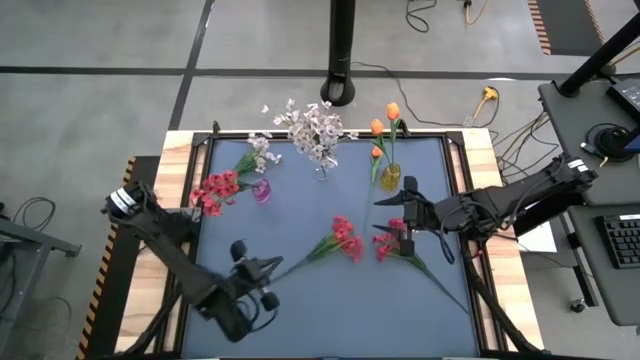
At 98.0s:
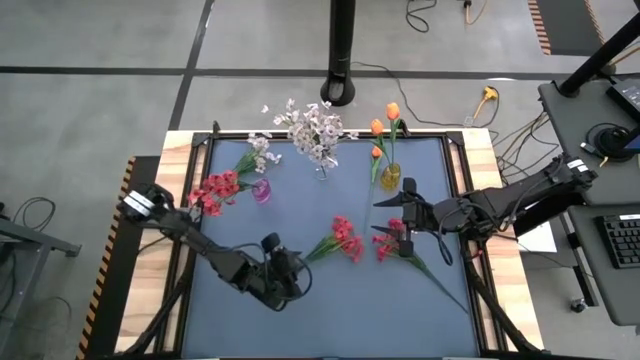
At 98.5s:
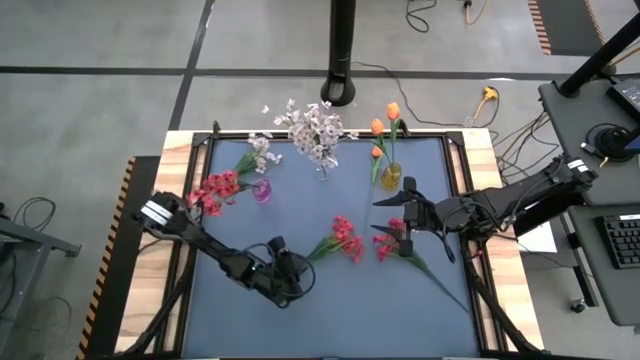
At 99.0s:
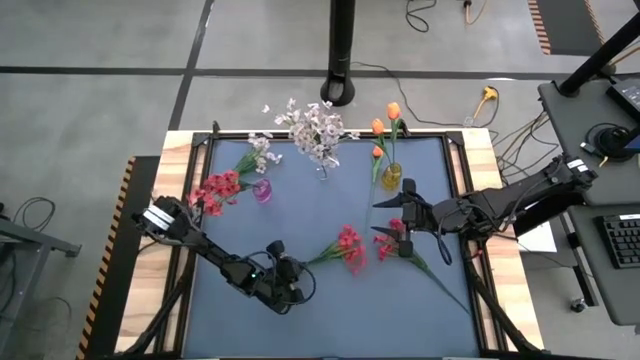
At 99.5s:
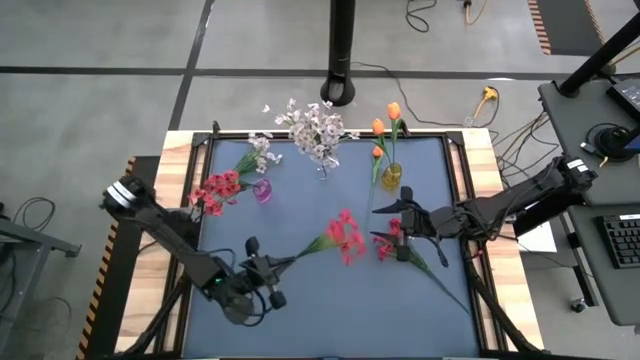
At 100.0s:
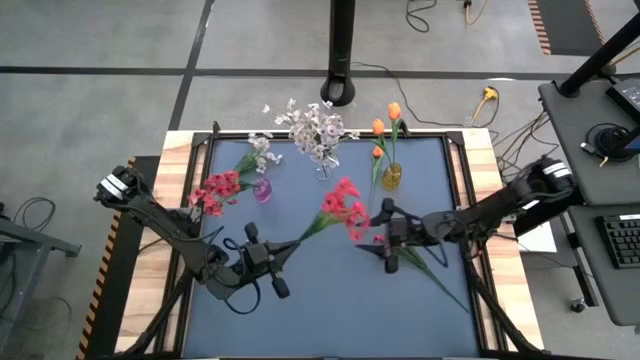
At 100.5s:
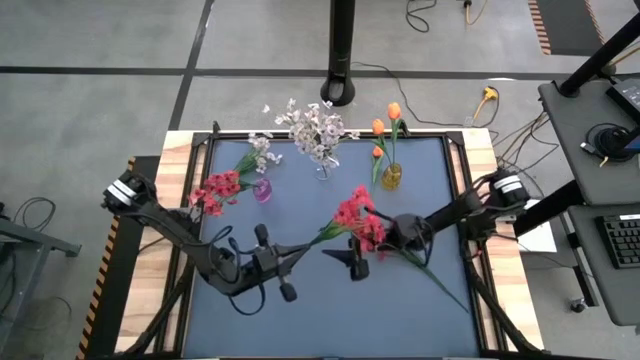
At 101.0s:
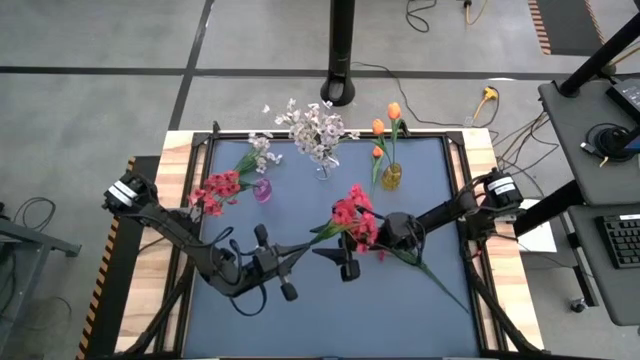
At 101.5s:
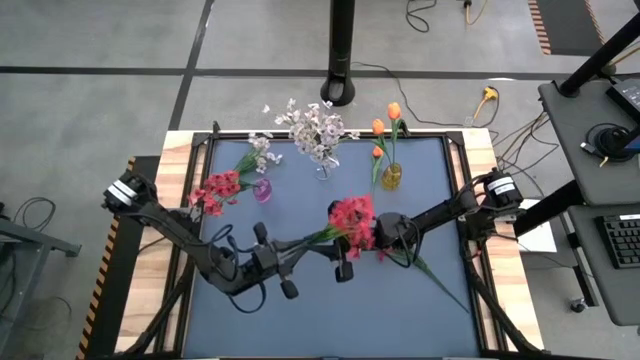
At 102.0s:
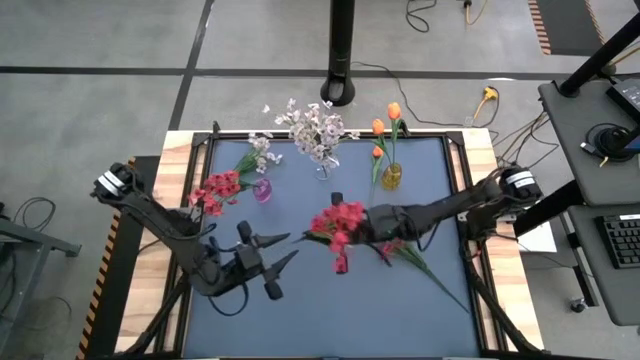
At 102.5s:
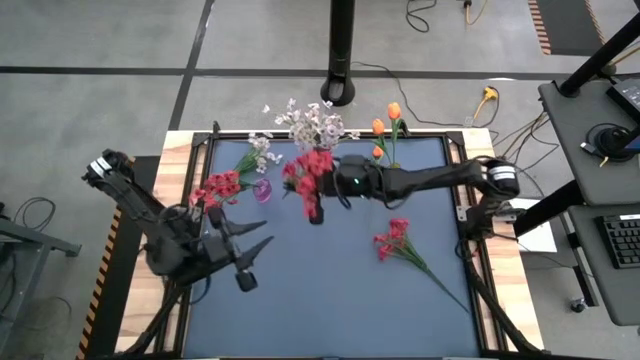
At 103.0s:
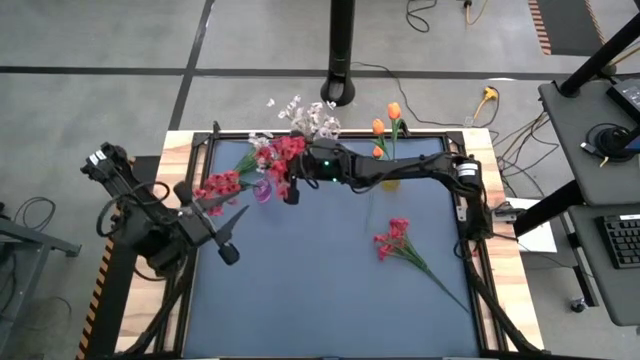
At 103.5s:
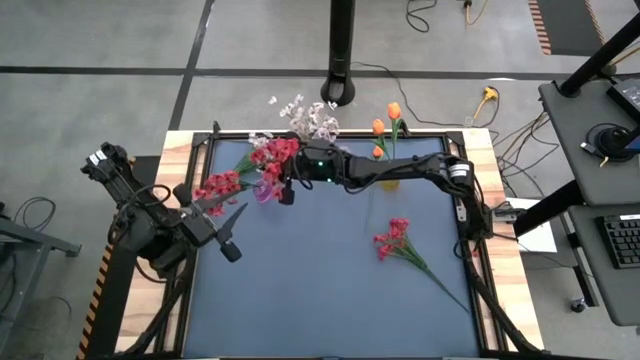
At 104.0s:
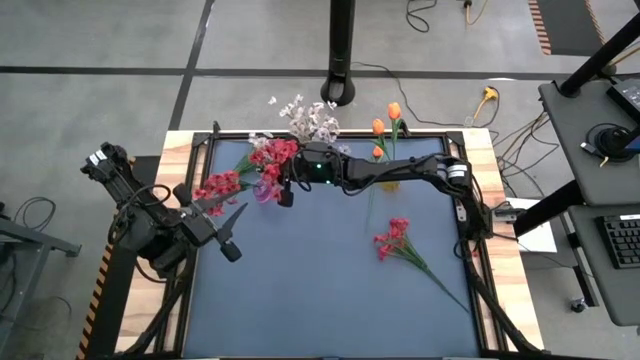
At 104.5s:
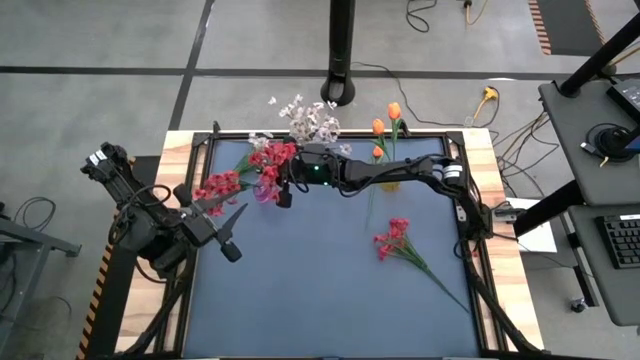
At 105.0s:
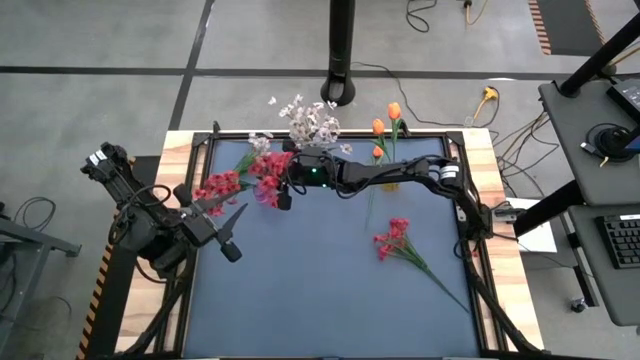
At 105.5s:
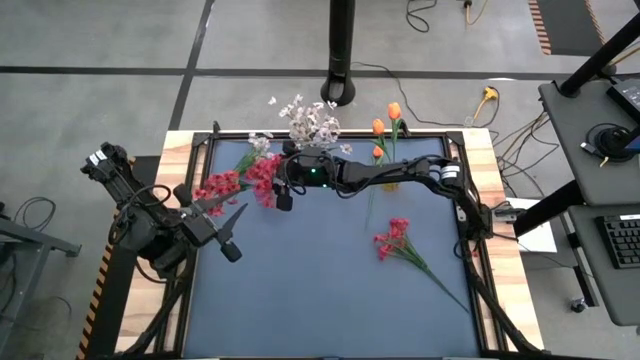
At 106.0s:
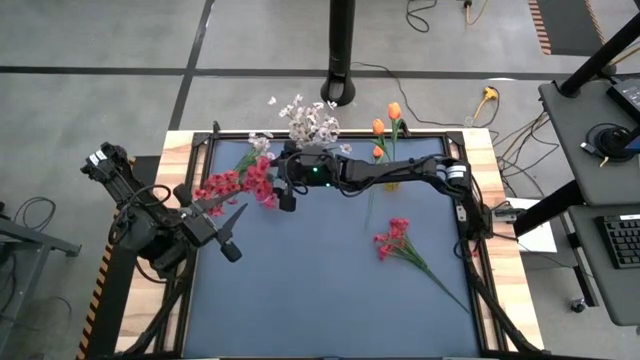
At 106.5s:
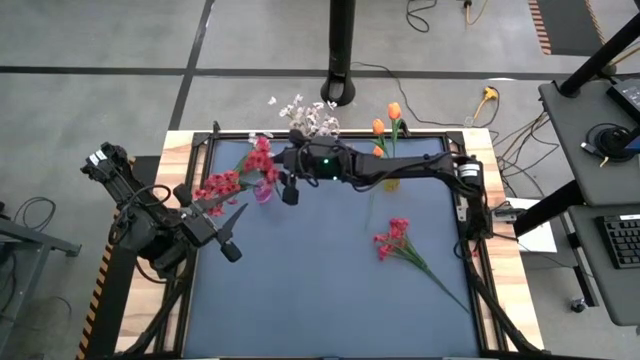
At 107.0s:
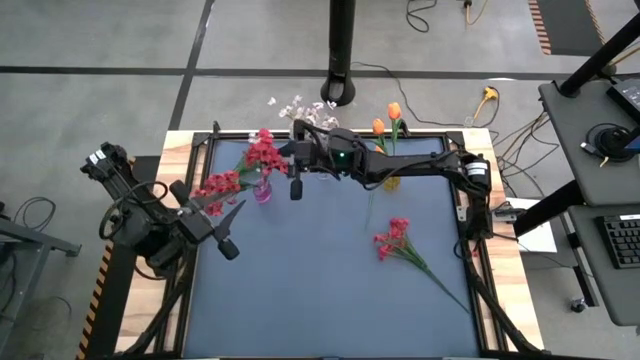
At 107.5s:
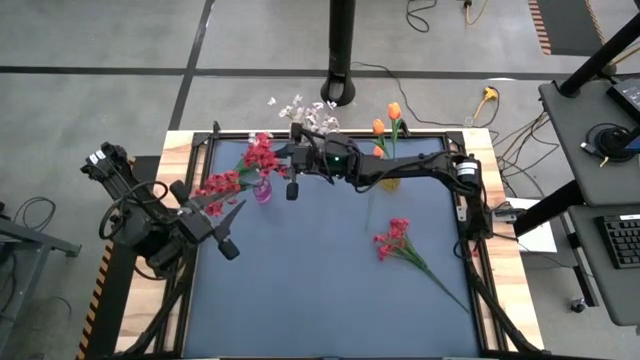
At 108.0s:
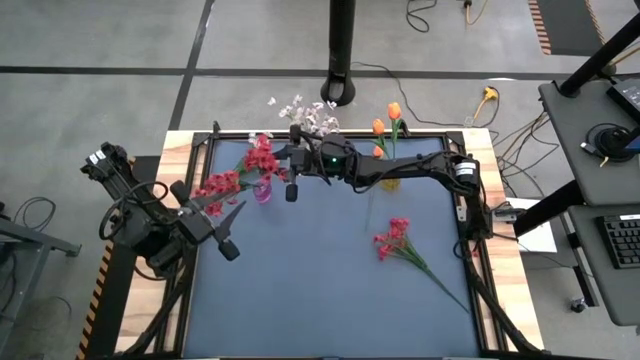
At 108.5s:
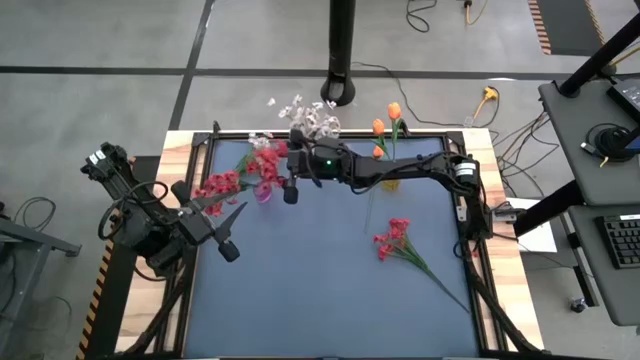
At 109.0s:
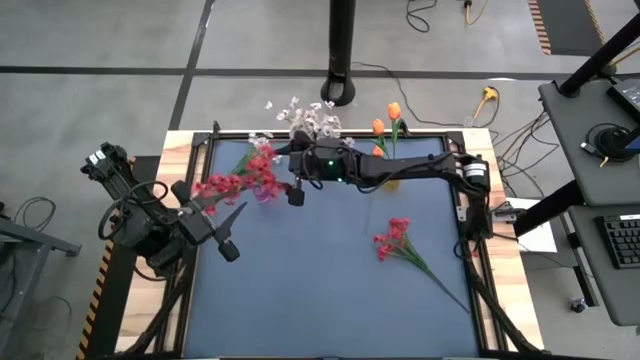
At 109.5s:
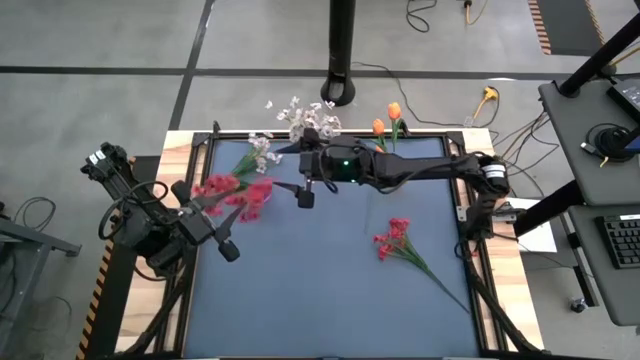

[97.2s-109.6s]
Task: Sort flowers into vase by color
Put the red flower into the purple vase

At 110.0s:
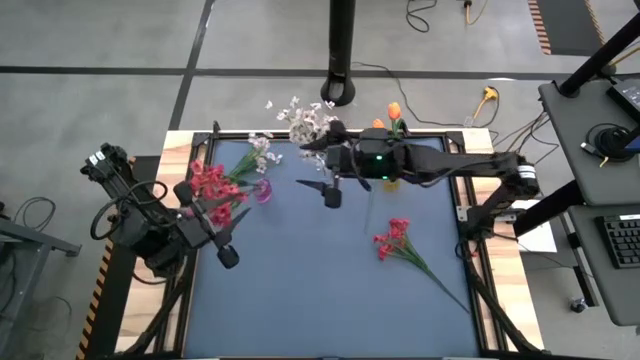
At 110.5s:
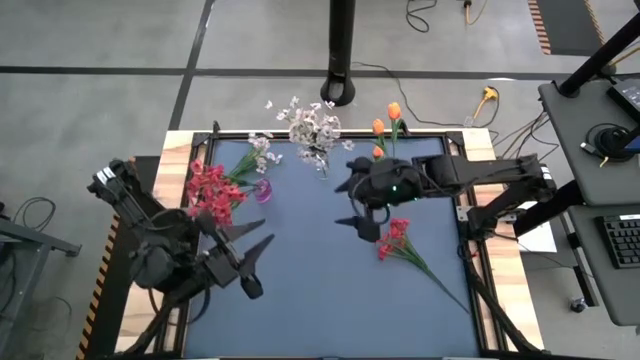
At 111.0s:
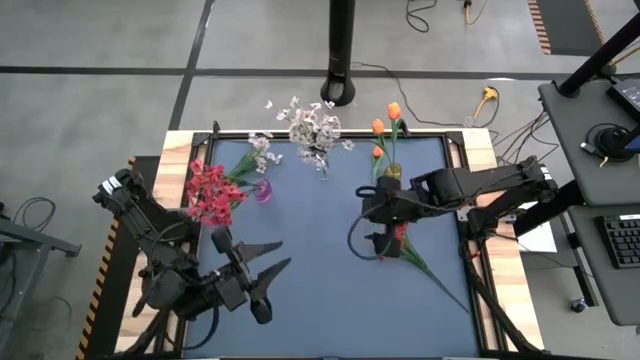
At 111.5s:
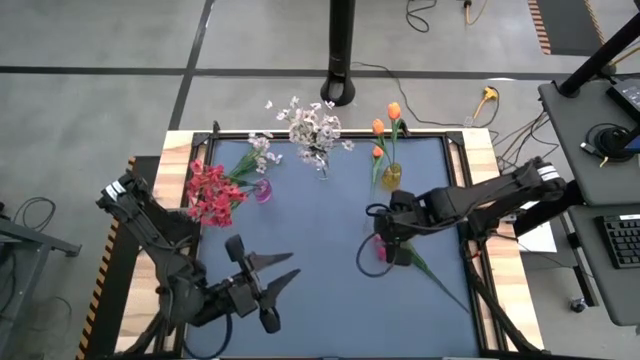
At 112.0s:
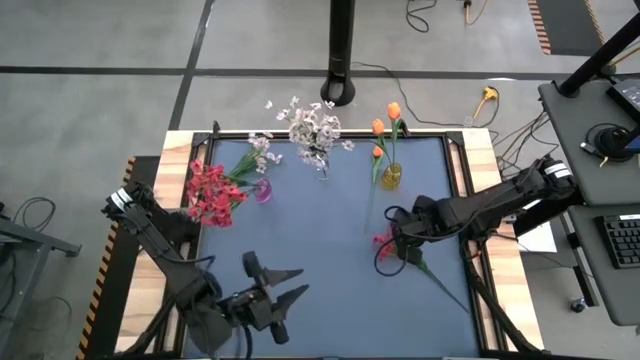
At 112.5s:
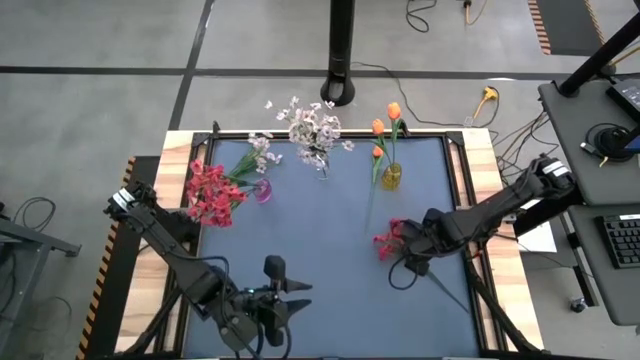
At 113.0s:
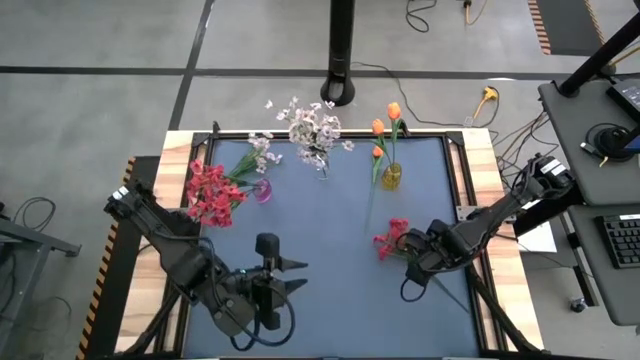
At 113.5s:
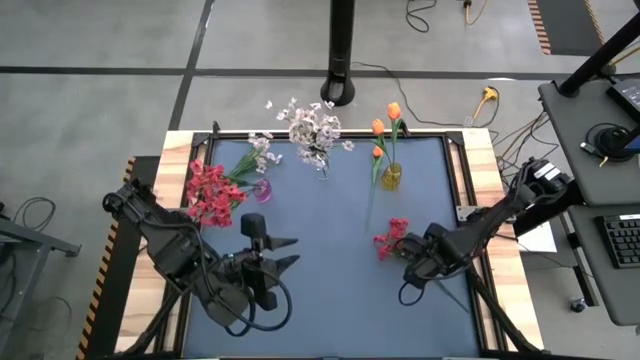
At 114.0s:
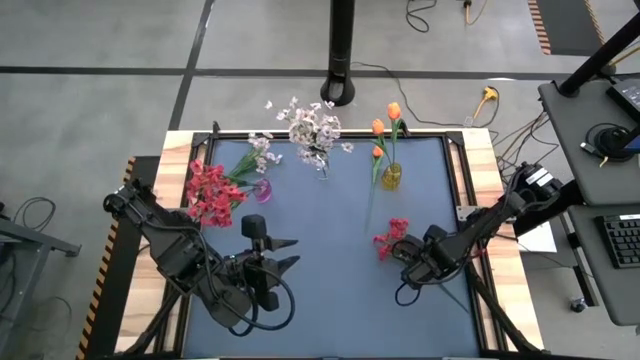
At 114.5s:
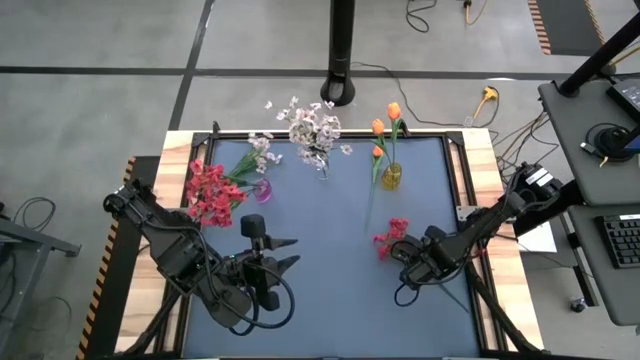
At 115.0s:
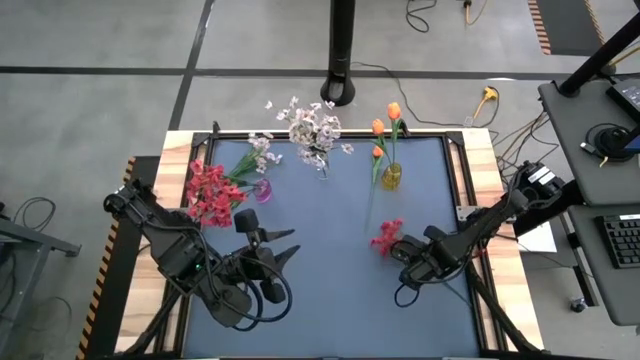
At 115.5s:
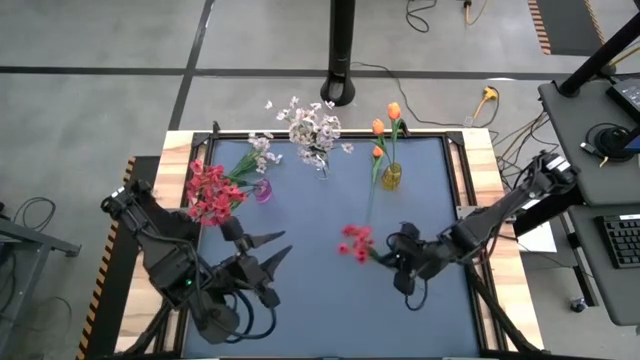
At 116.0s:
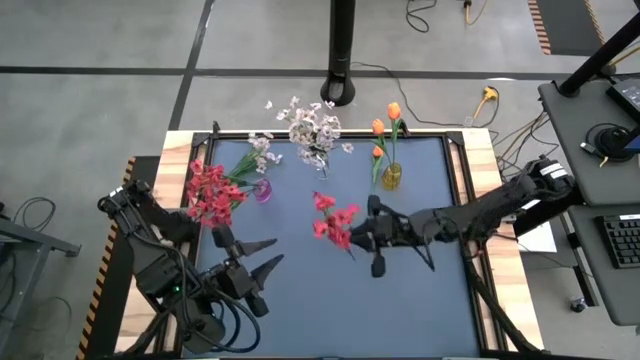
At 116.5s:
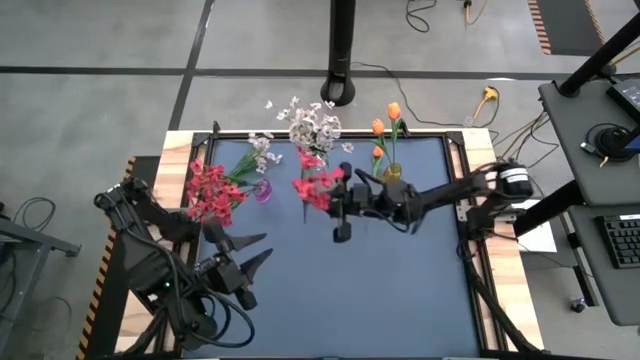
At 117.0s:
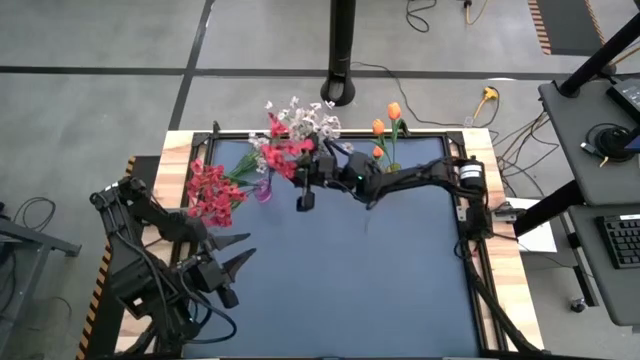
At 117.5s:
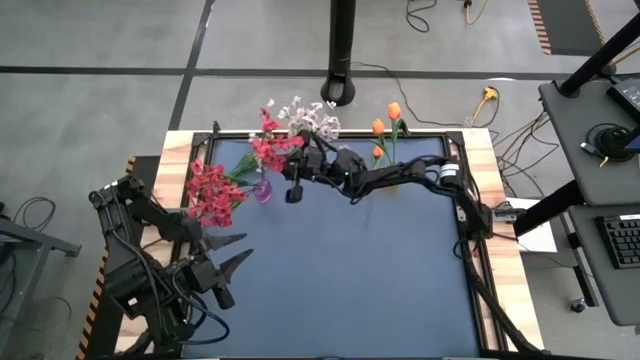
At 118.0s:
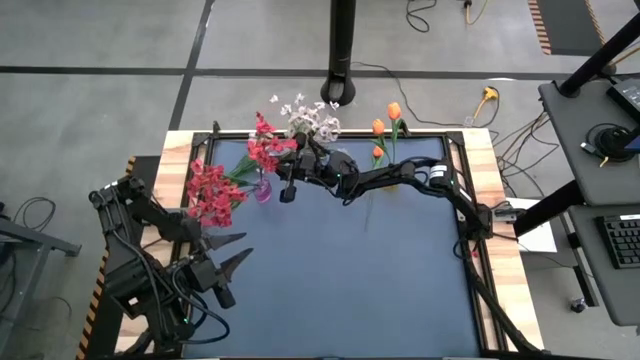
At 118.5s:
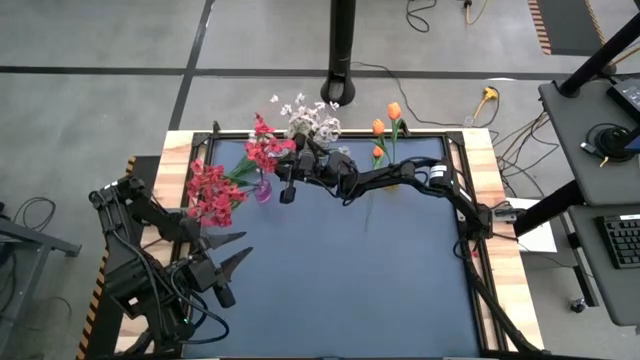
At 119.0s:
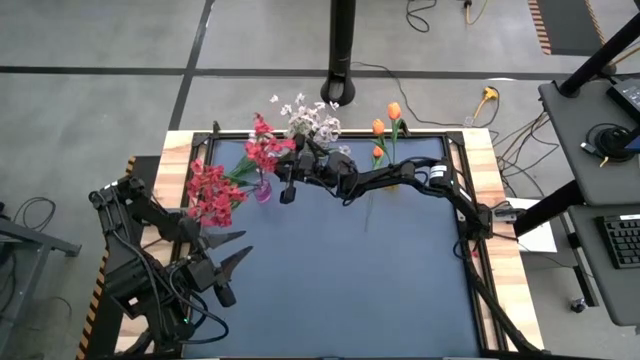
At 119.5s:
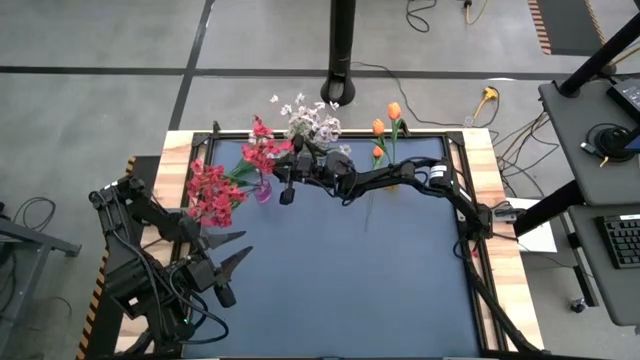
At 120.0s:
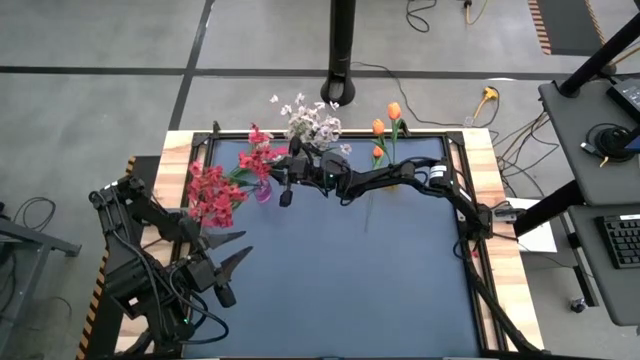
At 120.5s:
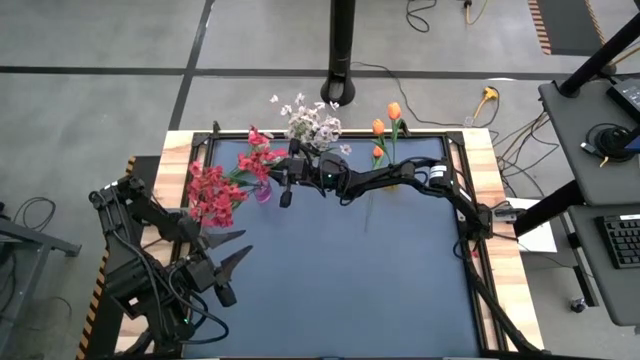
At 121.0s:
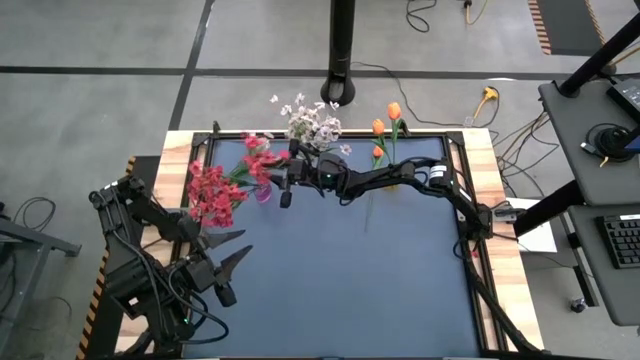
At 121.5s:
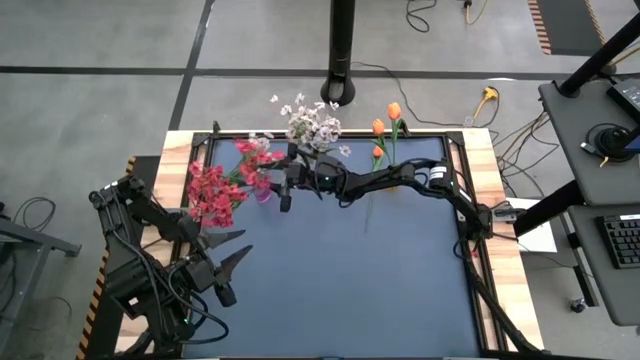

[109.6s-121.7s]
Put the red flower into the purple vase
